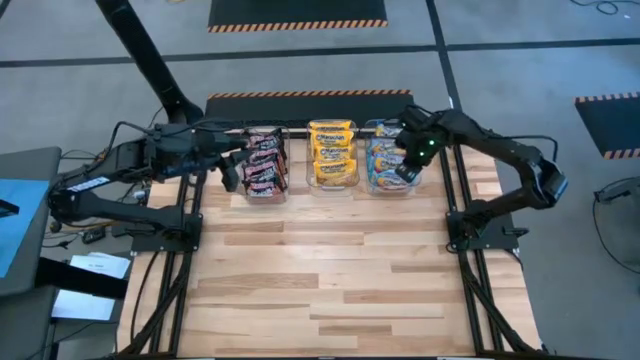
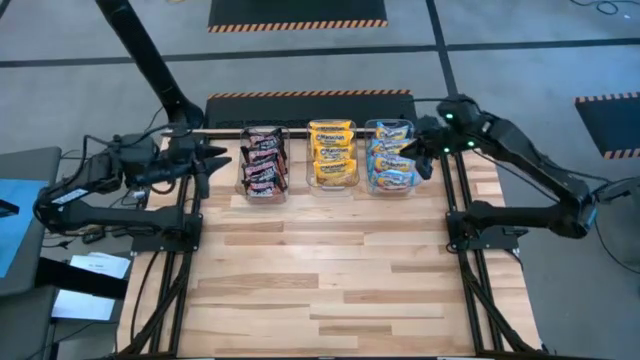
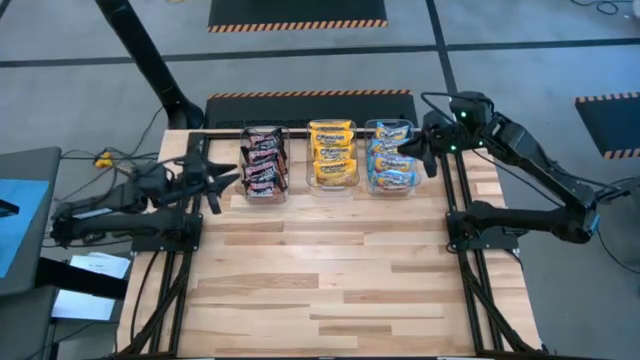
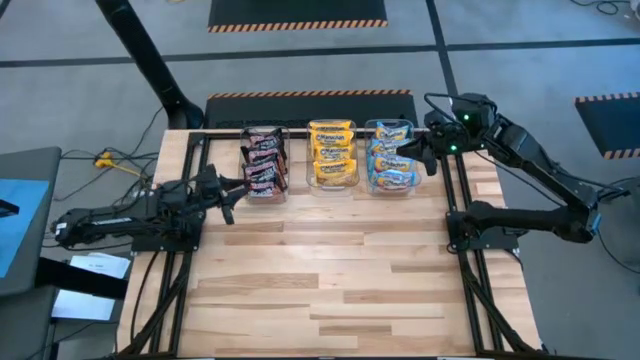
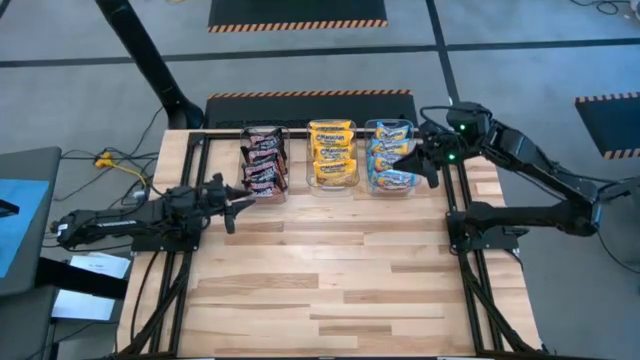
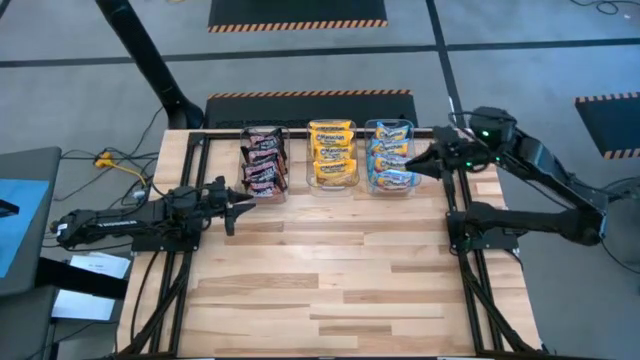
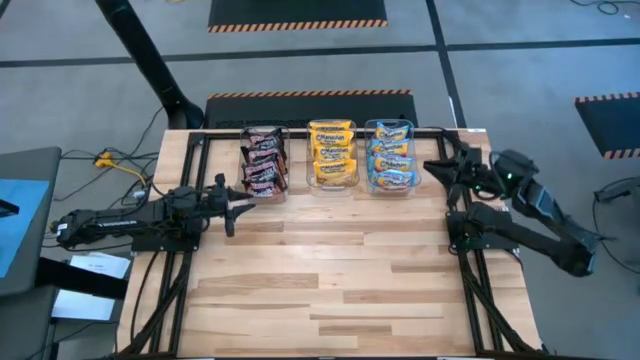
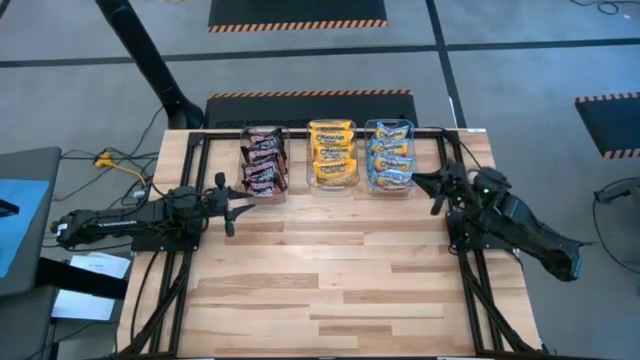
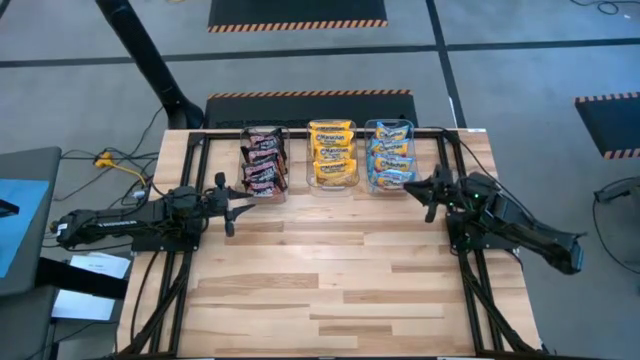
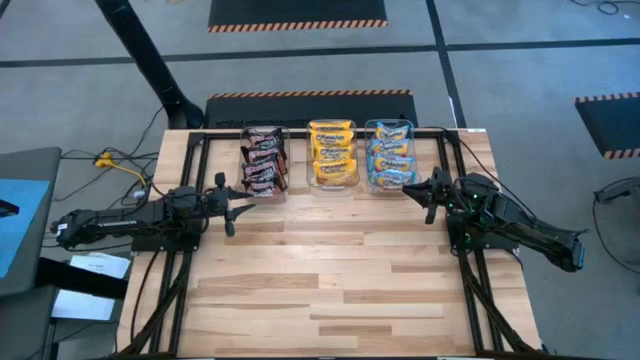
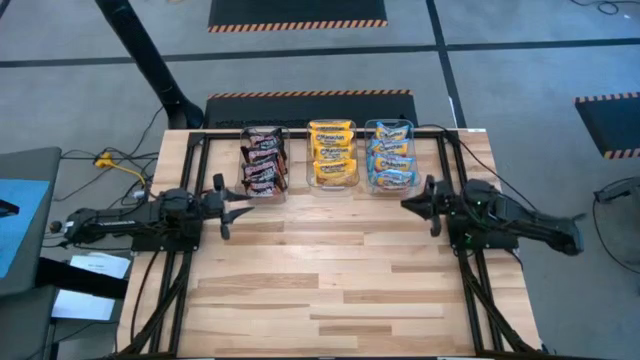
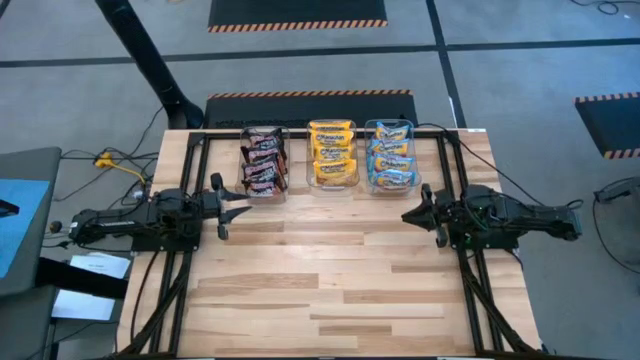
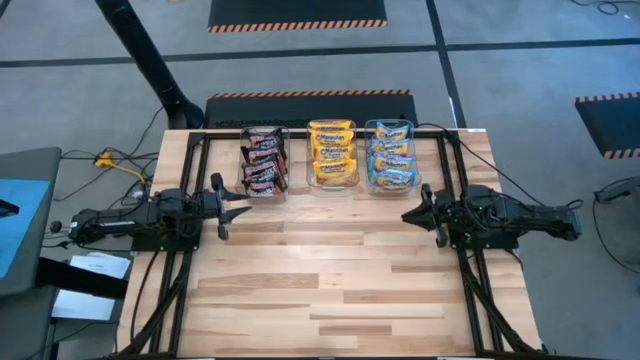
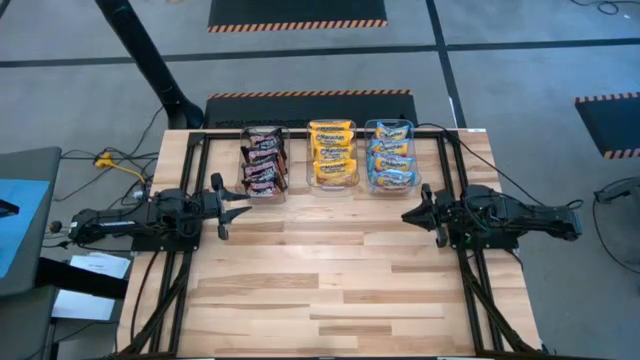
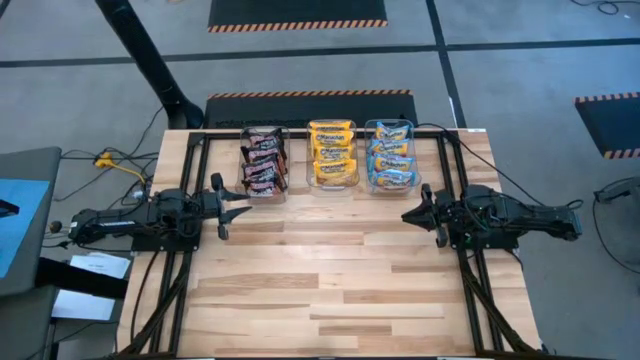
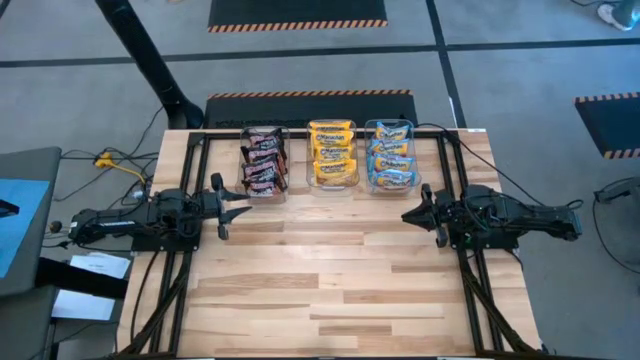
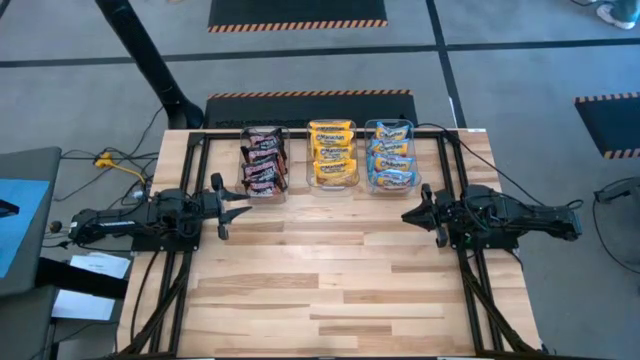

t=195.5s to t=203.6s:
Task: Sort Maruchan noodles
Return to Home Position

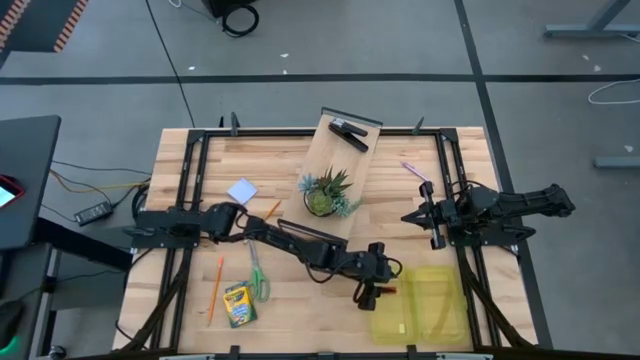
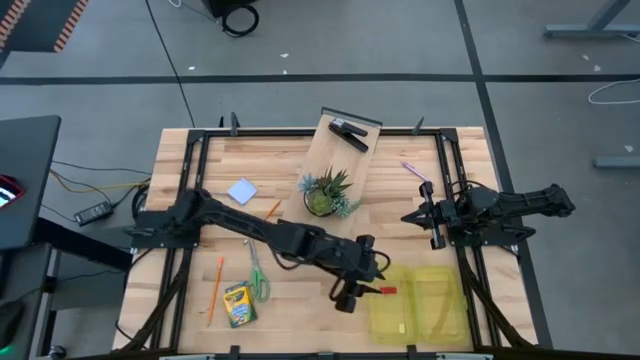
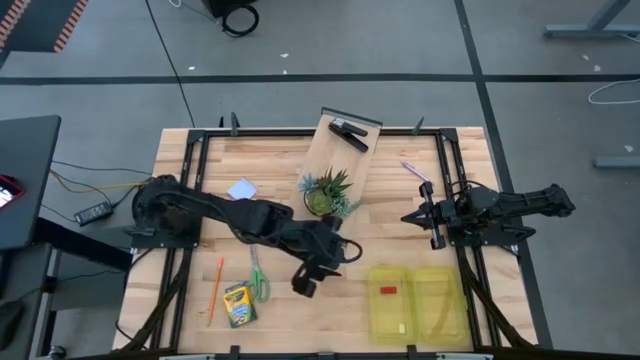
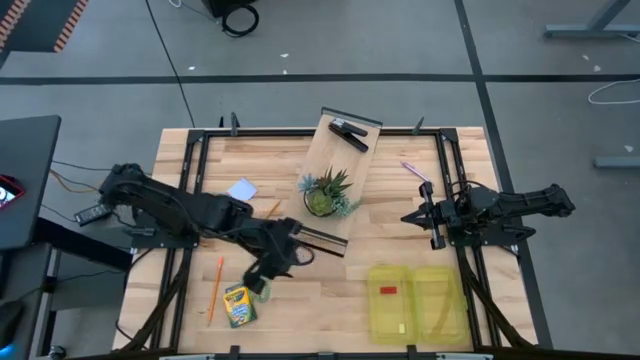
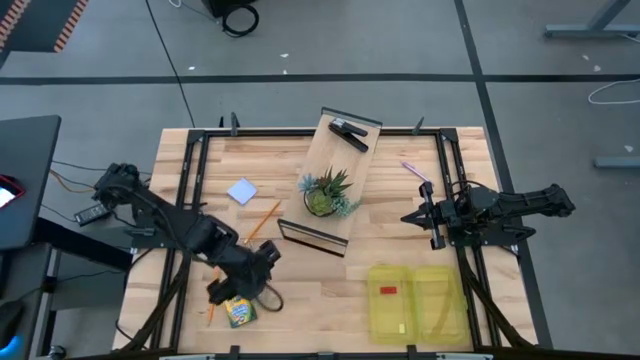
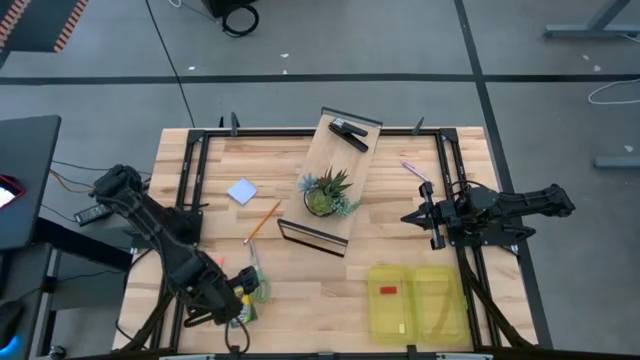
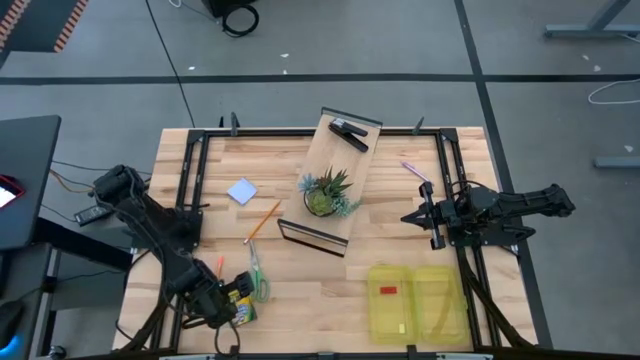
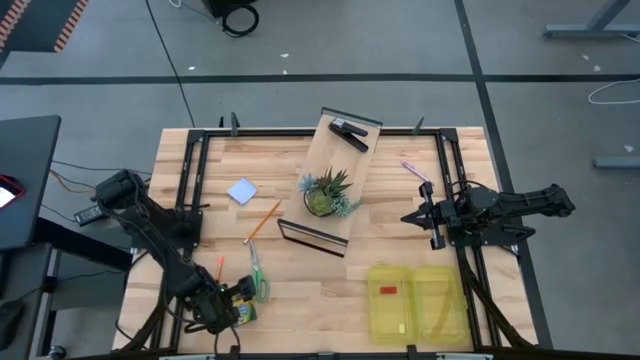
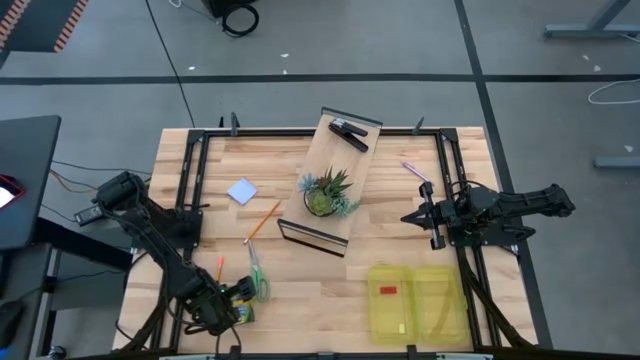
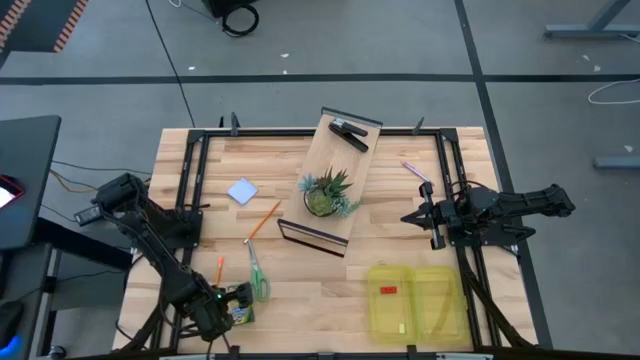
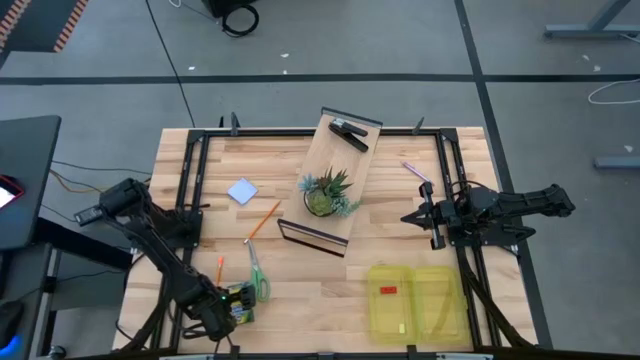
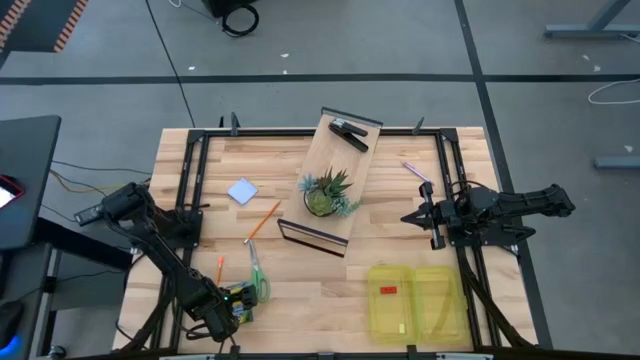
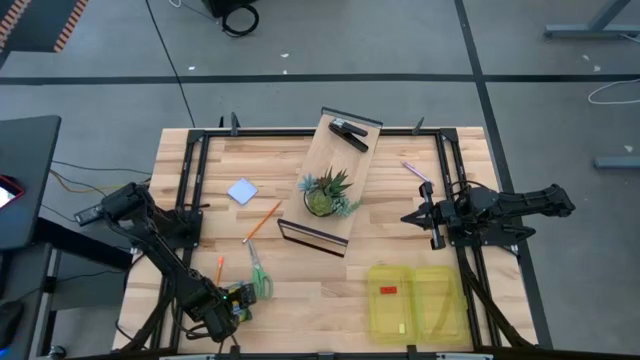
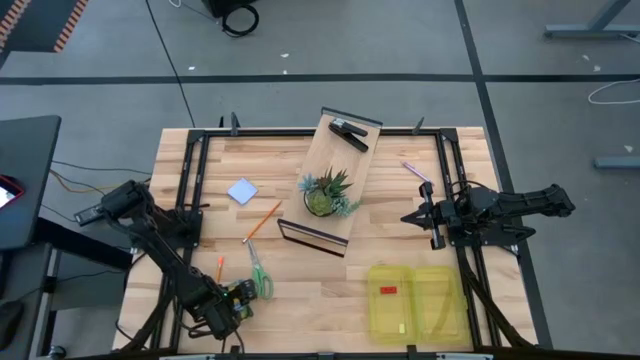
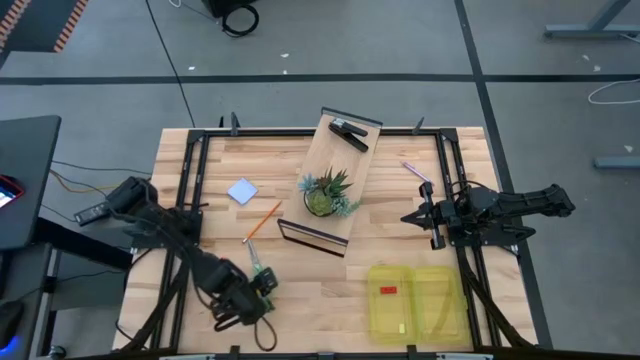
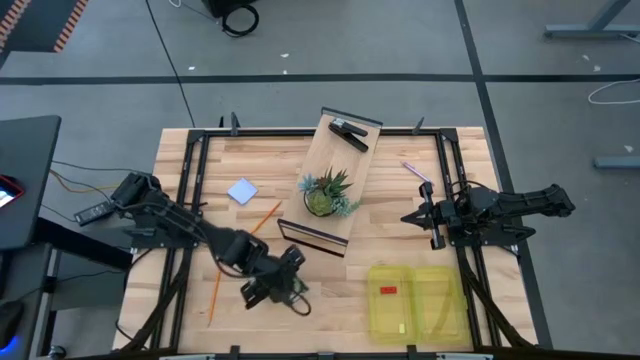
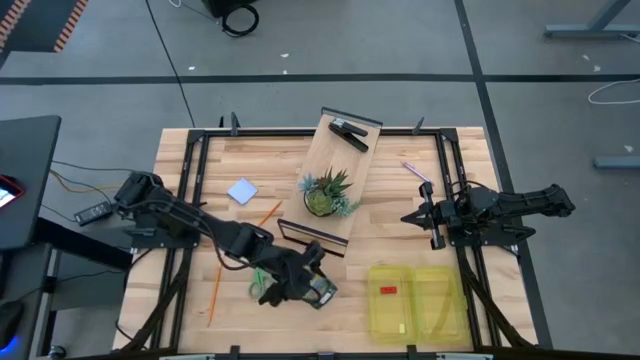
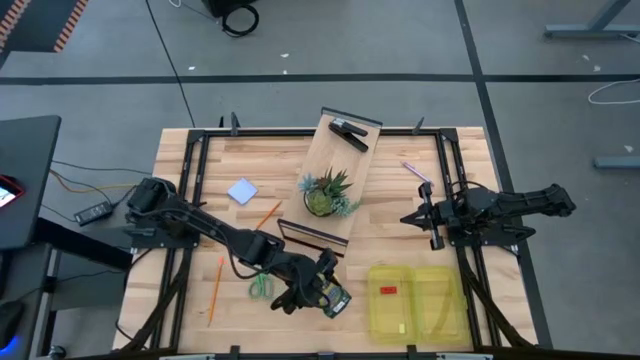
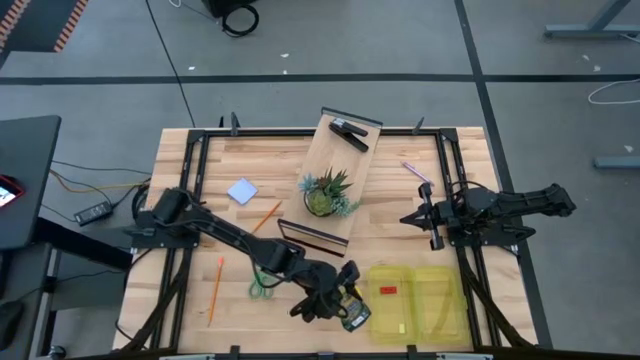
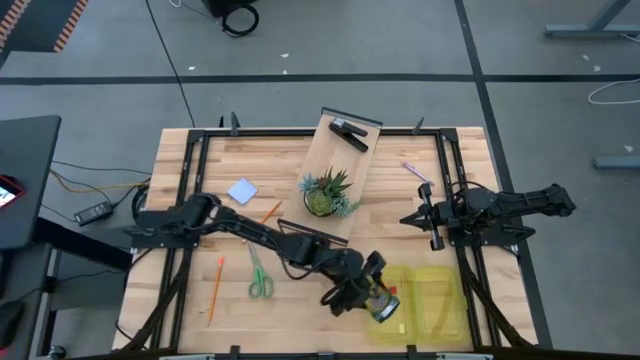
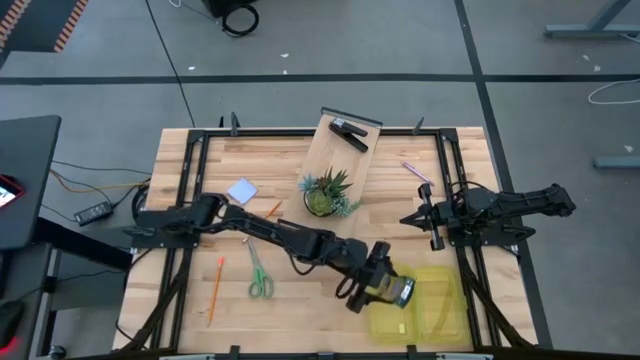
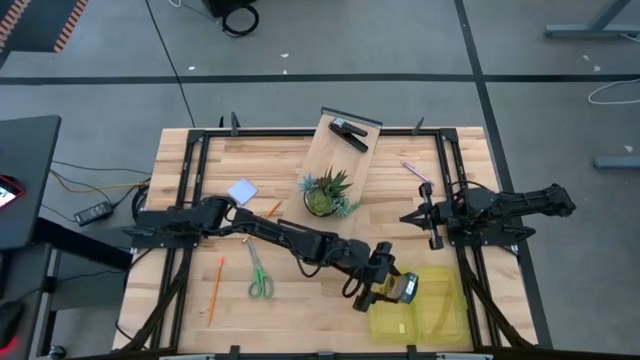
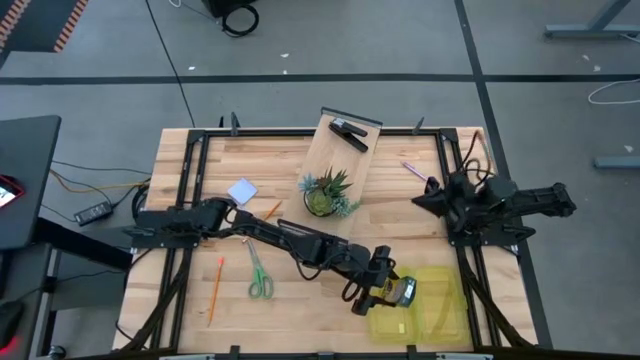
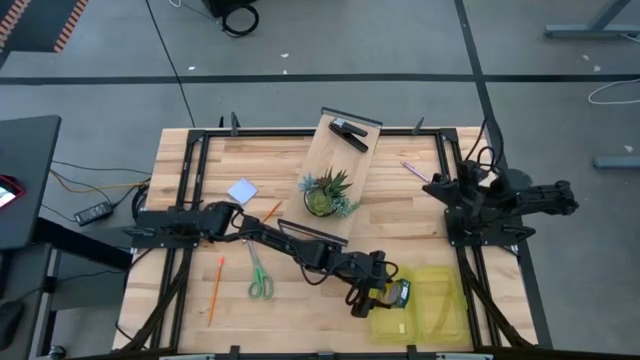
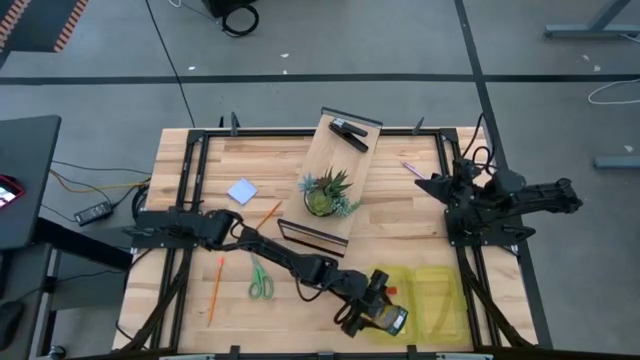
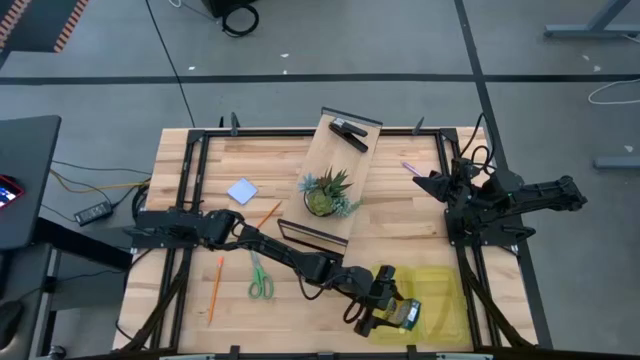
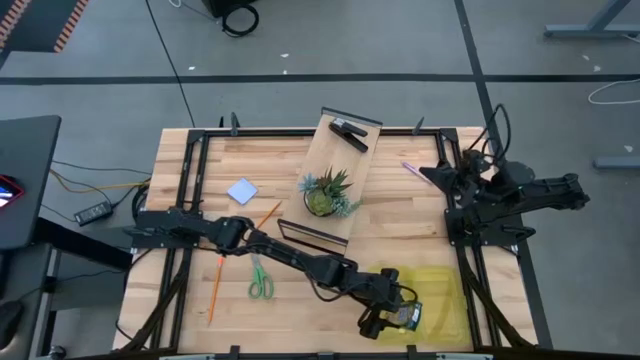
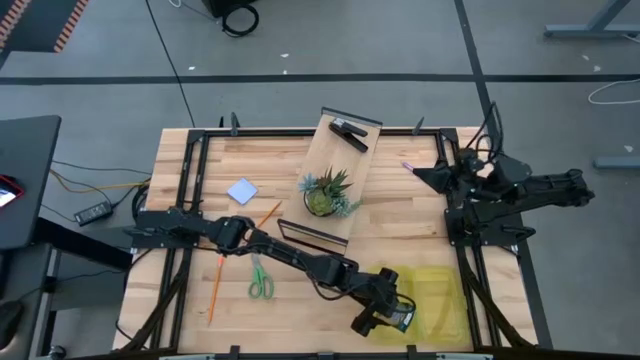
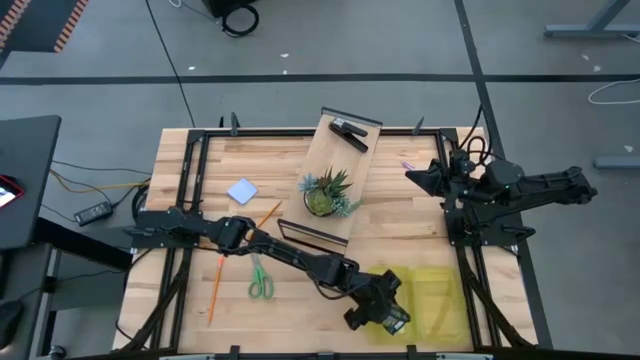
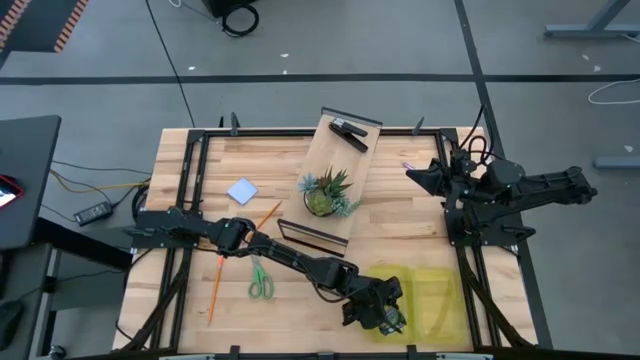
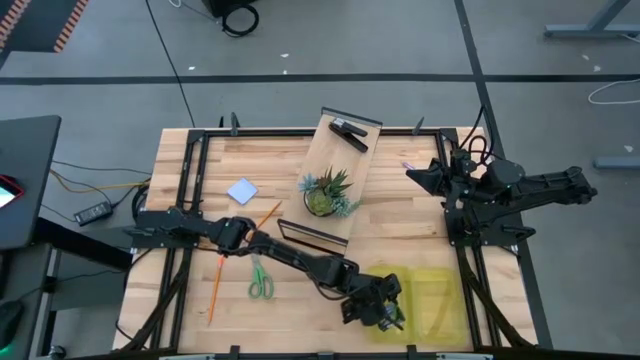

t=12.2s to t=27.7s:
Task: Pack school essentials
Put the yellow crayon box into the yellow supply box
